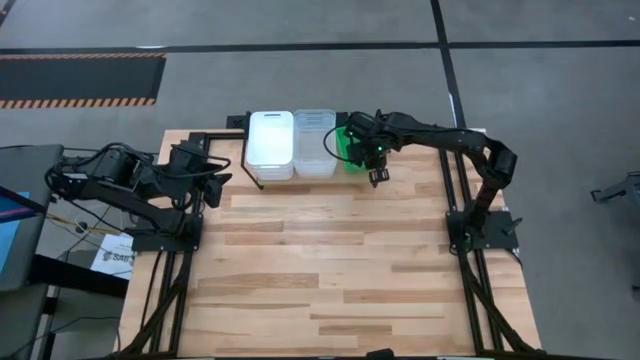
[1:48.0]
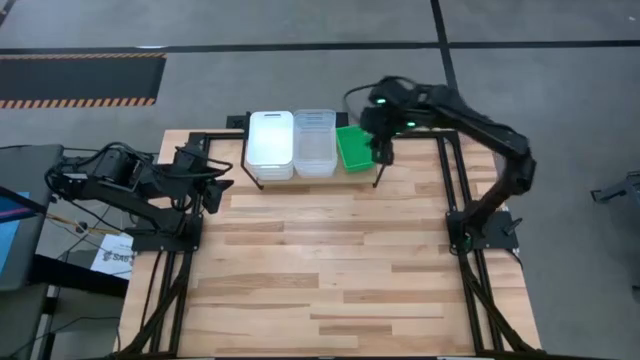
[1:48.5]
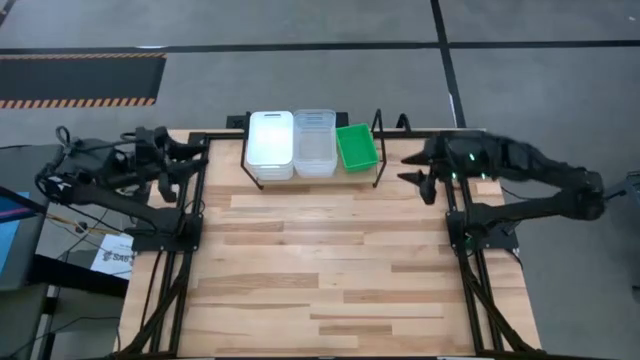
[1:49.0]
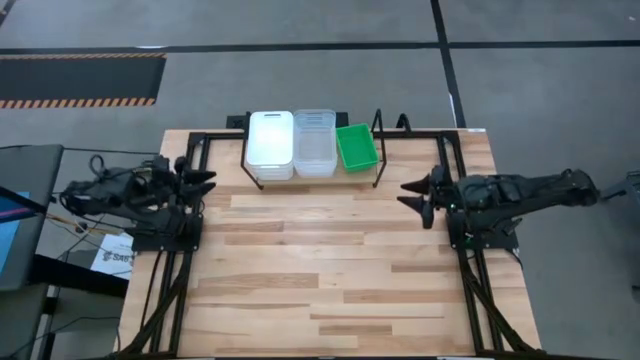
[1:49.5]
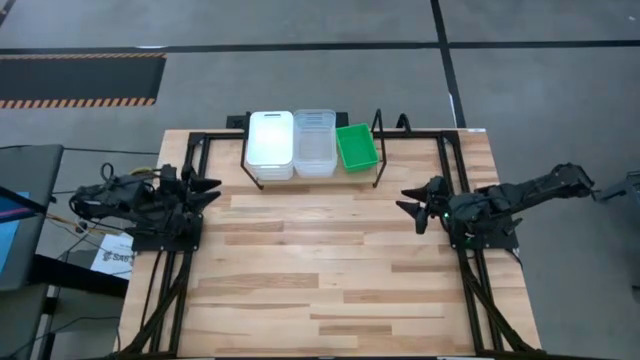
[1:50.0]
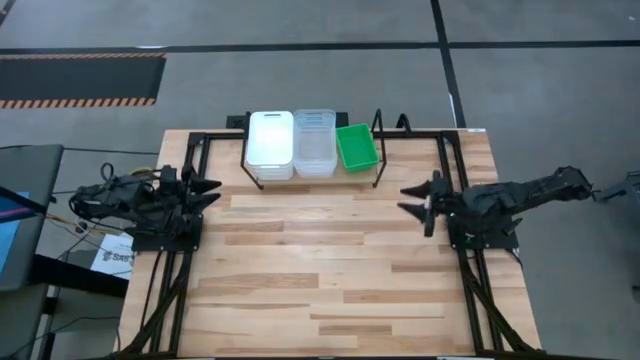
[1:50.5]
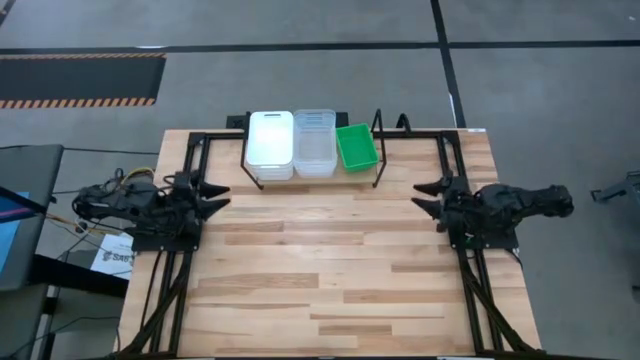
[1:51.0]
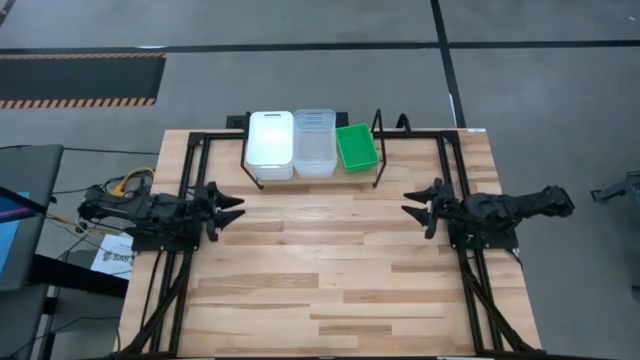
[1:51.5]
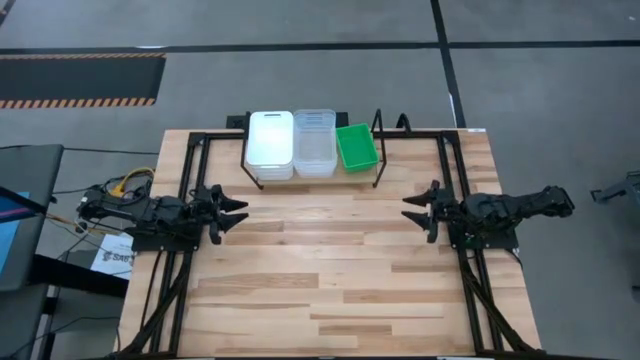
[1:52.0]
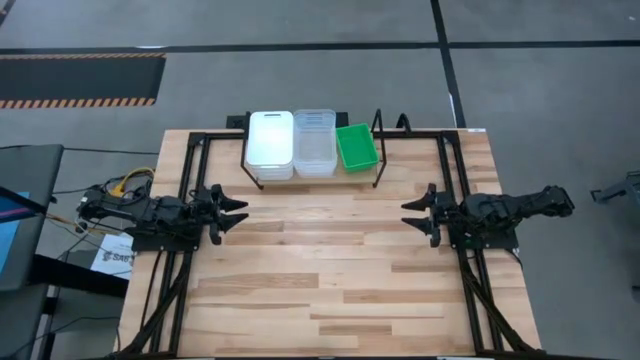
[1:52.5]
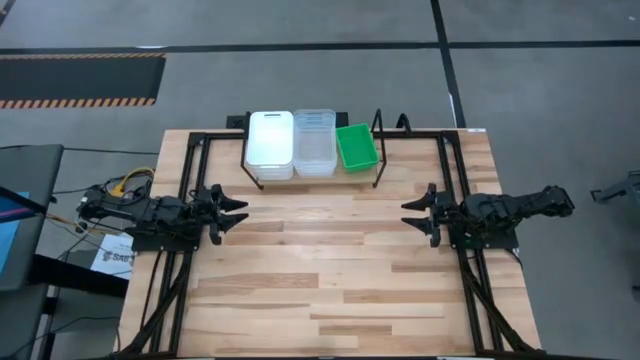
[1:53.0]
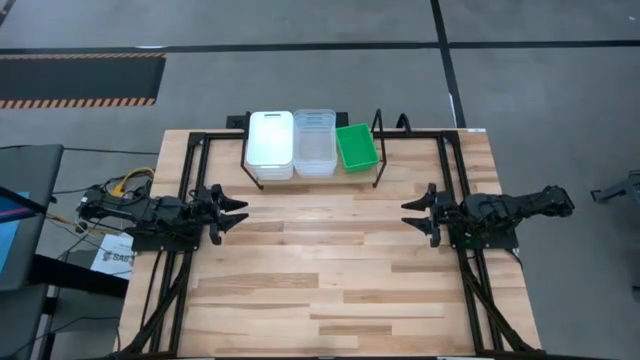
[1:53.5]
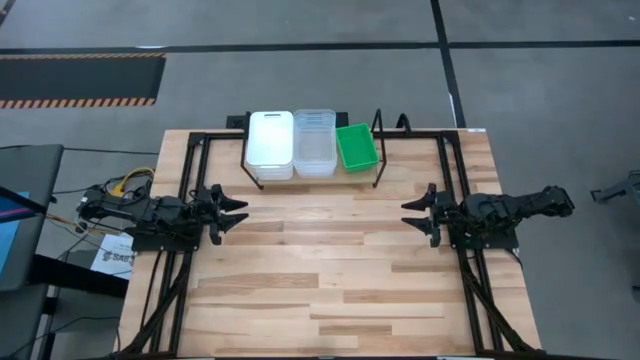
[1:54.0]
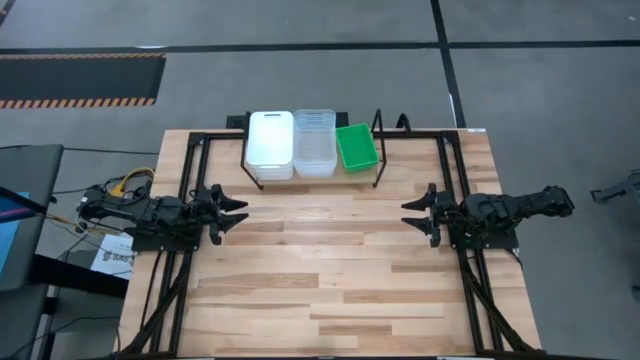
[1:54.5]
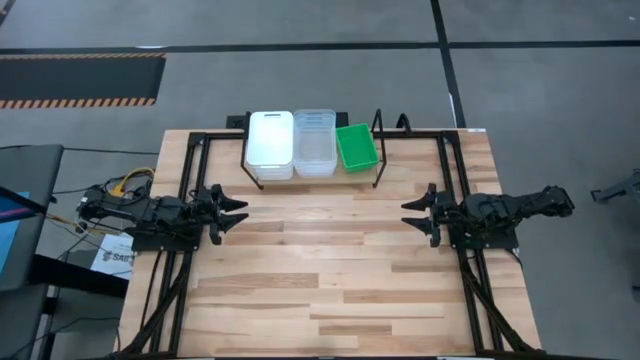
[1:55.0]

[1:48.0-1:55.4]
Task: Stack baskets on shelf by color
Return to Home Position

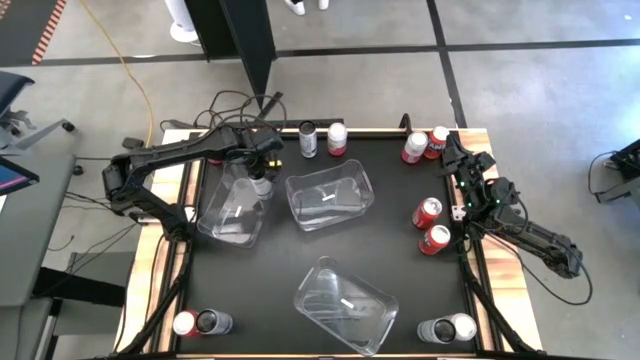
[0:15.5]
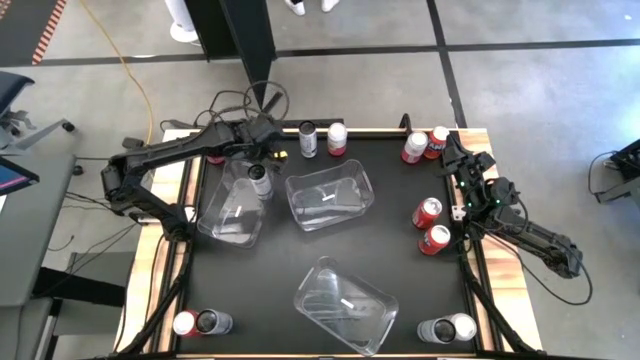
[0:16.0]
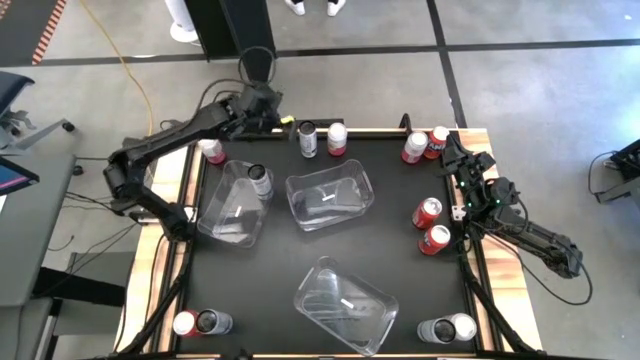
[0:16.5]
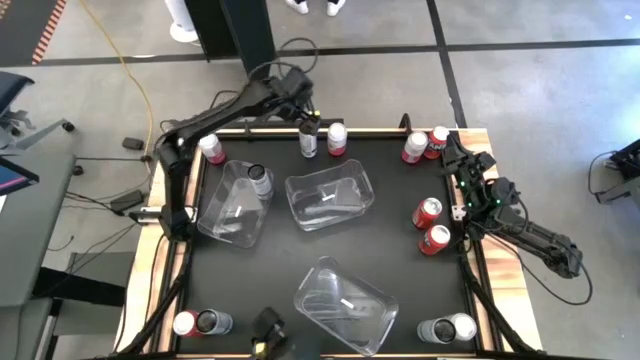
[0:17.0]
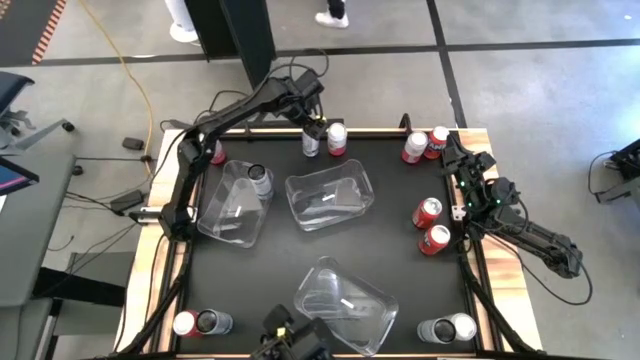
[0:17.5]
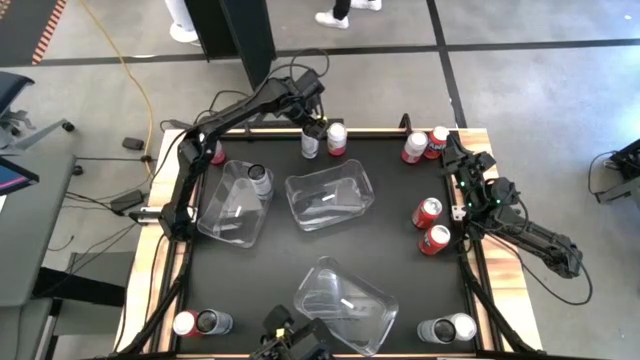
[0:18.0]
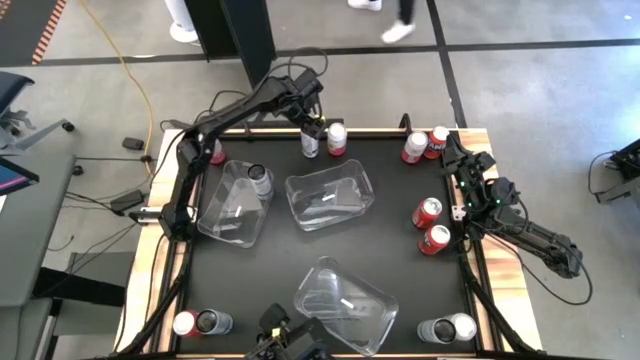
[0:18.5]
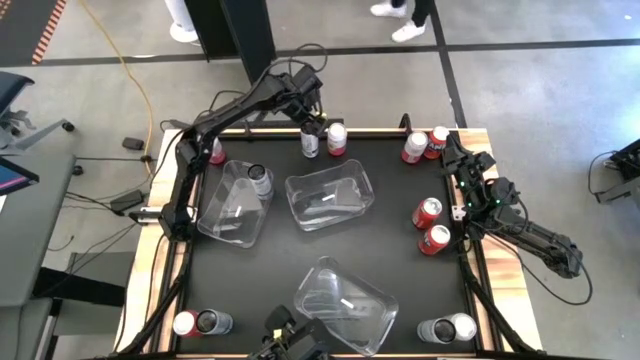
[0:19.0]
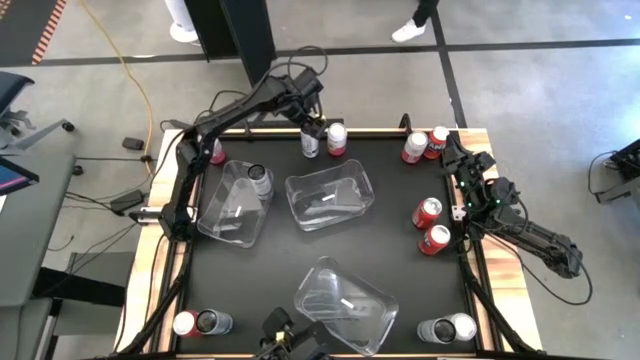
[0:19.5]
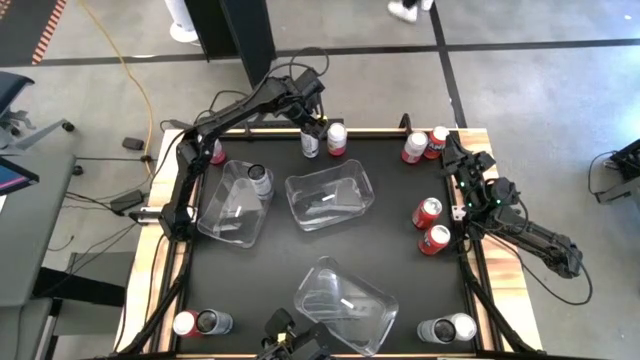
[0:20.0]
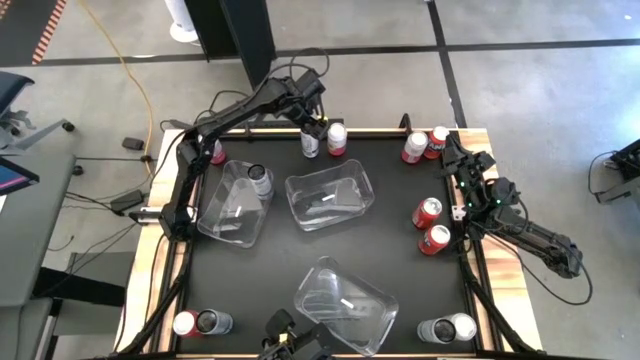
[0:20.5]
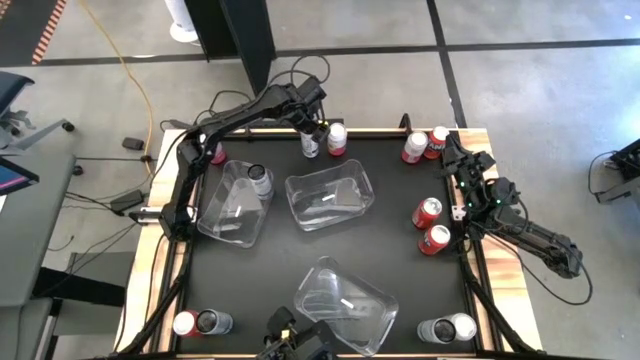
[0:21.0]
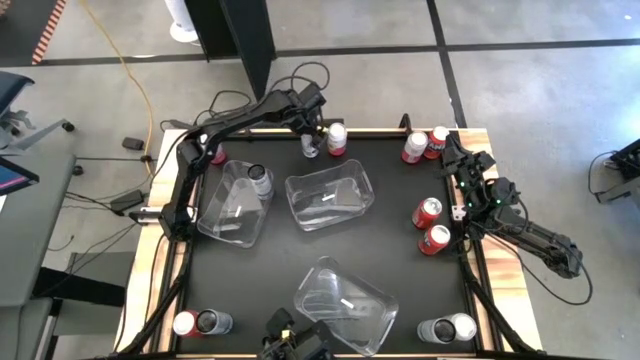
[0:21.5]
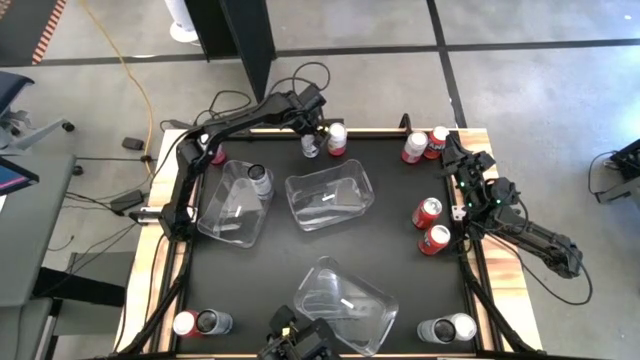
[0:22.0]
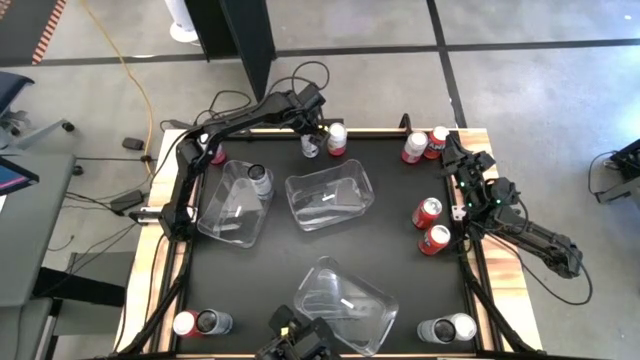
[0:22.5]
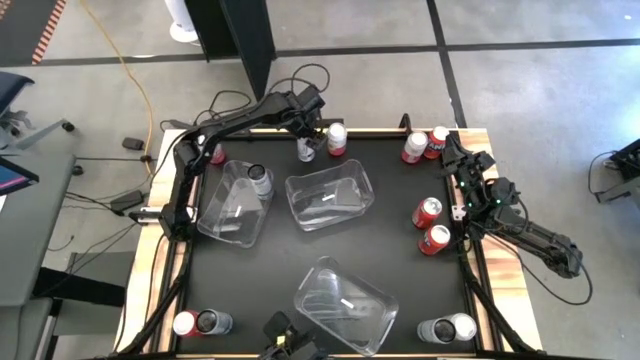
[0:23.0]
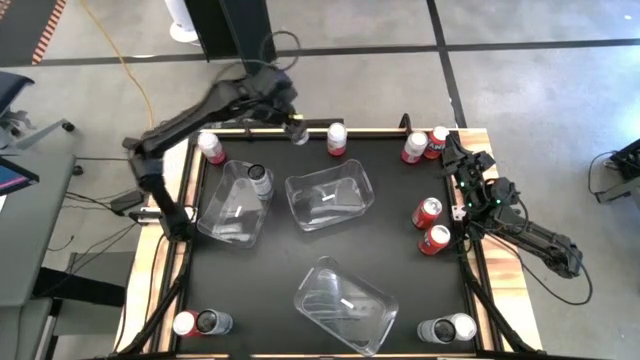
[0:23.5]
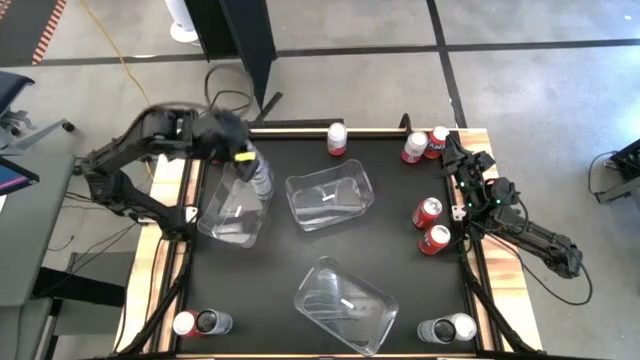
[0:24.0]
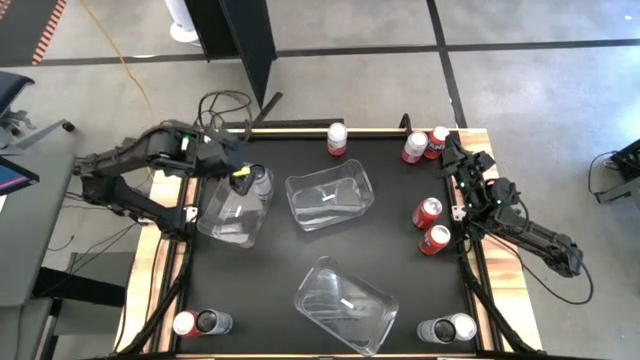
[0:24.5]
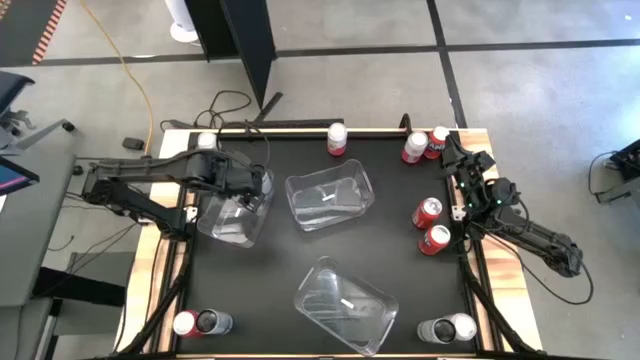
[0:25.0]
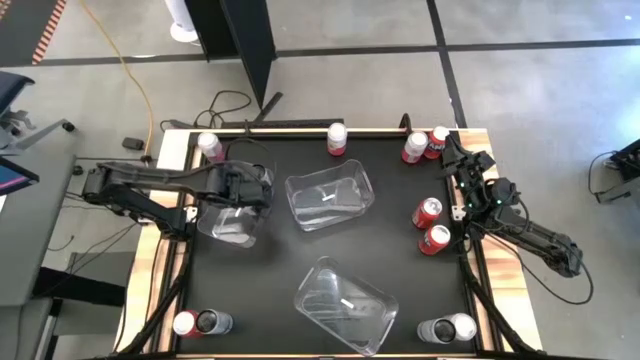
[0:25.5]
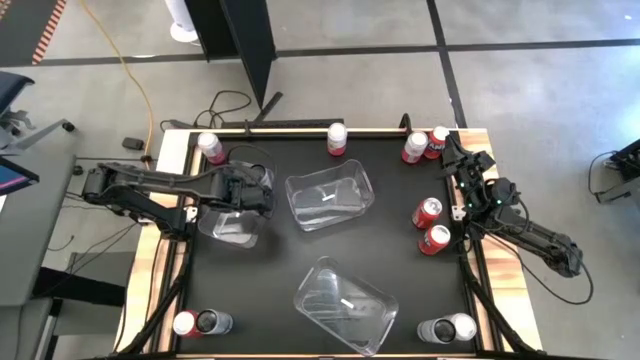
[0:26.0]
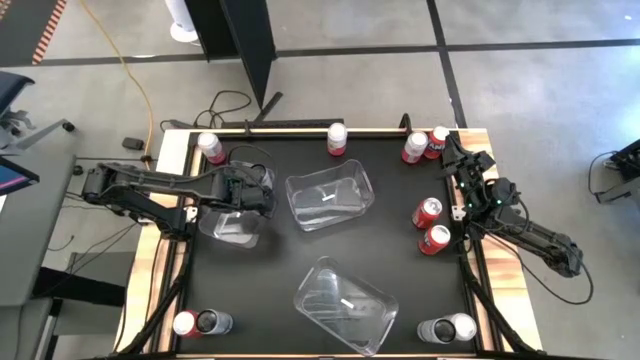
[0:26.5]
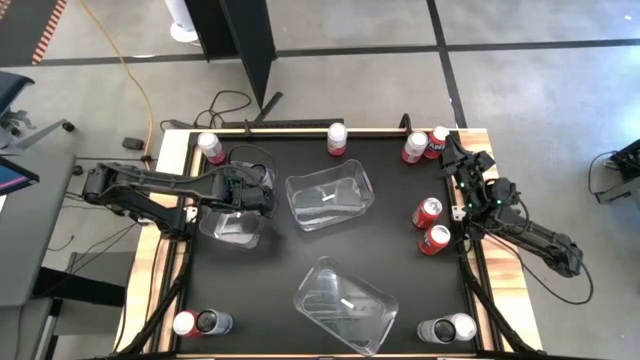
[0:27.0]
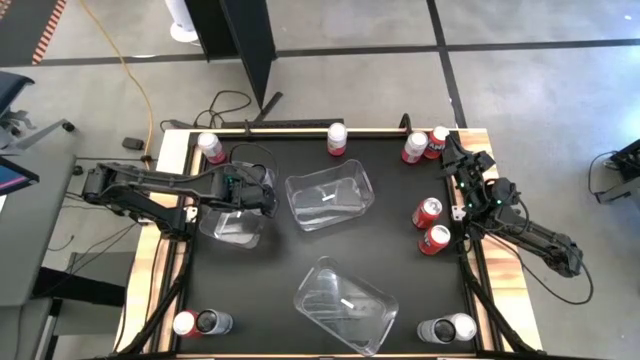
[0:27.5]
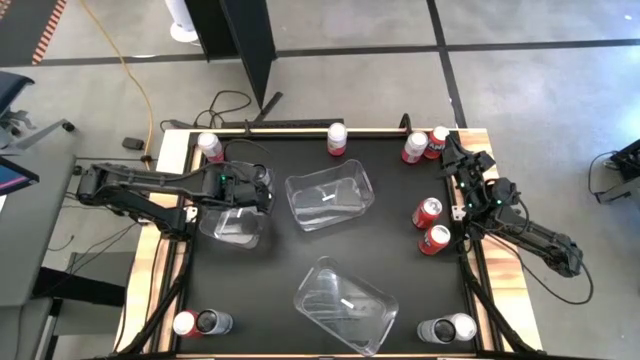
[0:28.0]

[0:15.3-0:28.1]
Task: Sort soda cans
Put the top black soda can in the top left transparent bin
